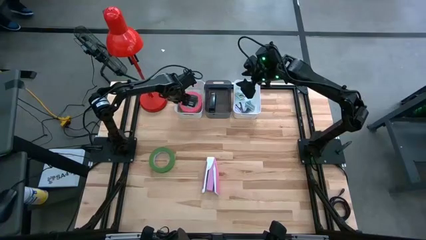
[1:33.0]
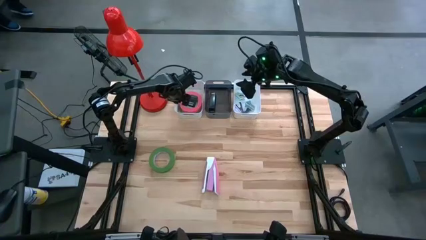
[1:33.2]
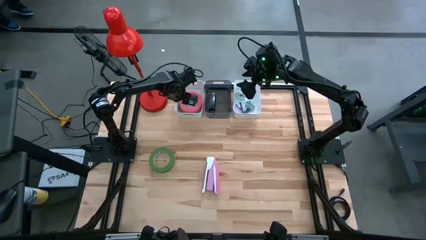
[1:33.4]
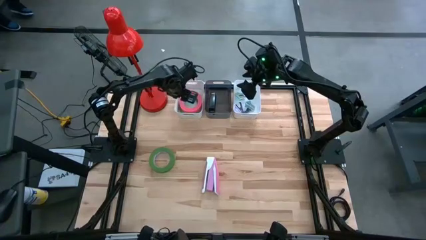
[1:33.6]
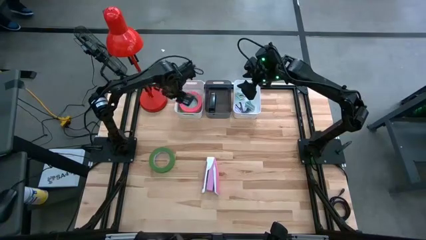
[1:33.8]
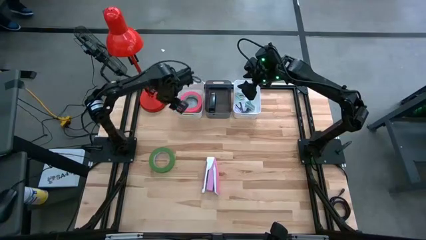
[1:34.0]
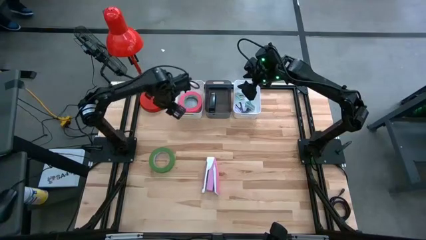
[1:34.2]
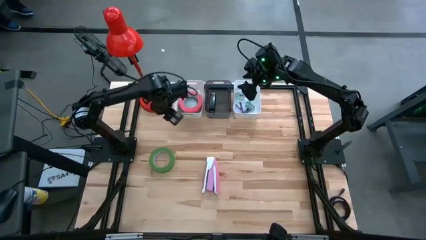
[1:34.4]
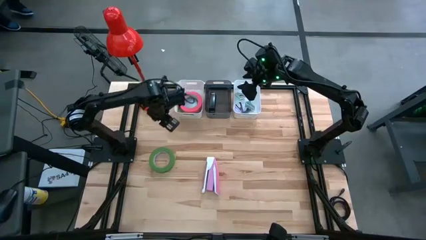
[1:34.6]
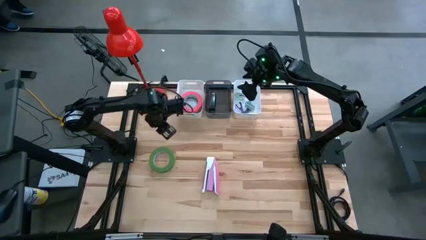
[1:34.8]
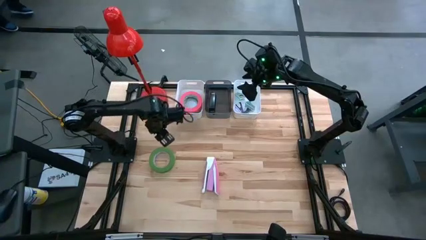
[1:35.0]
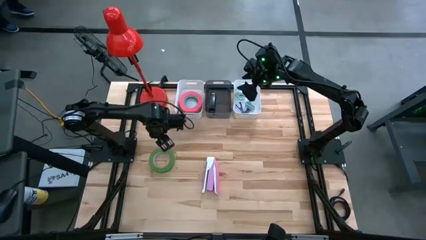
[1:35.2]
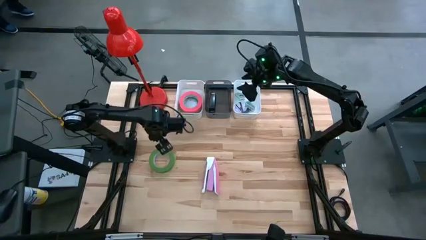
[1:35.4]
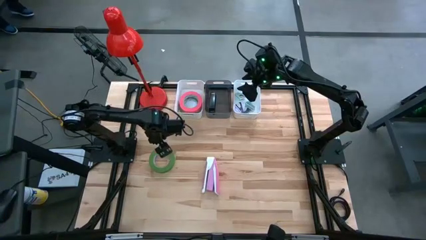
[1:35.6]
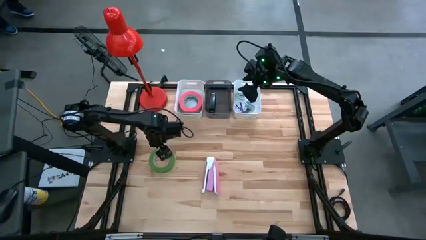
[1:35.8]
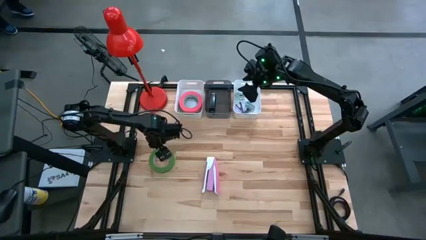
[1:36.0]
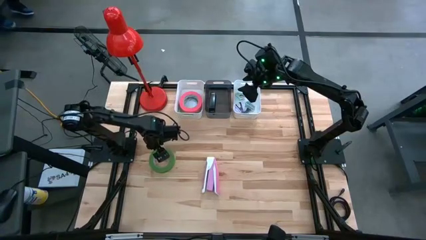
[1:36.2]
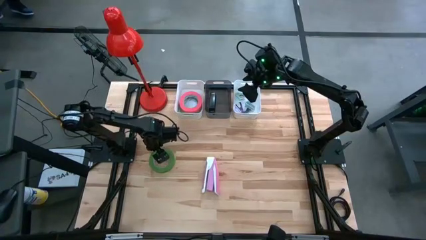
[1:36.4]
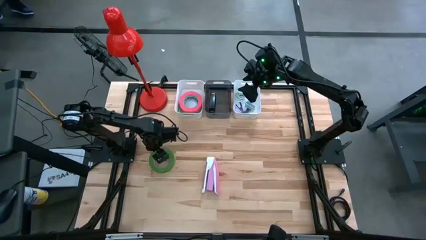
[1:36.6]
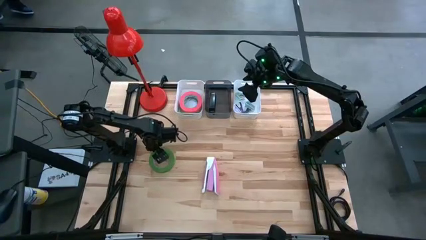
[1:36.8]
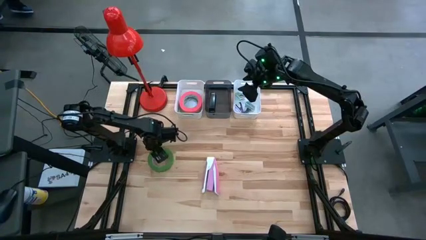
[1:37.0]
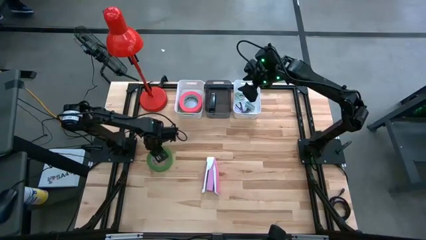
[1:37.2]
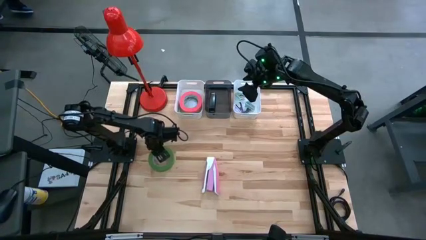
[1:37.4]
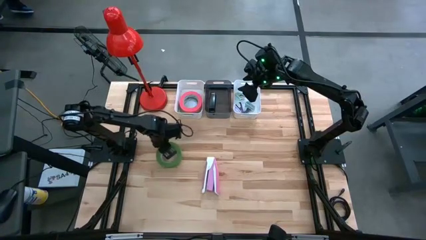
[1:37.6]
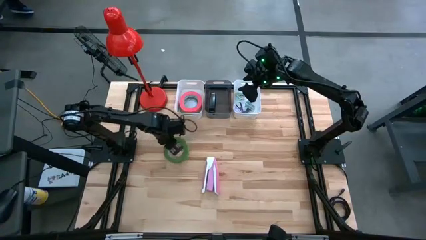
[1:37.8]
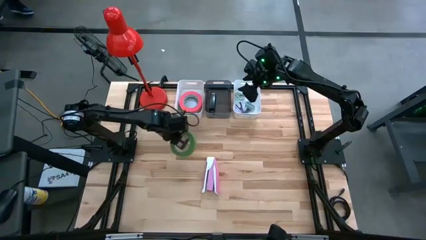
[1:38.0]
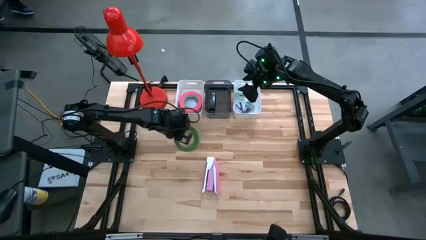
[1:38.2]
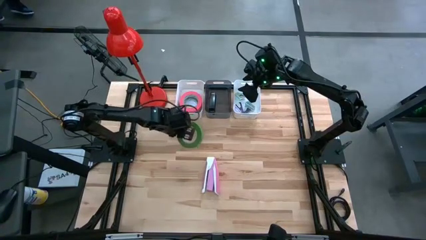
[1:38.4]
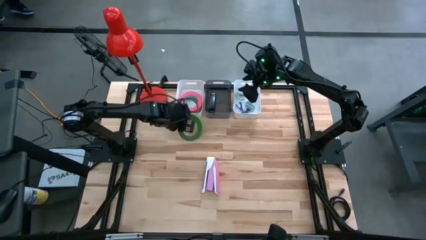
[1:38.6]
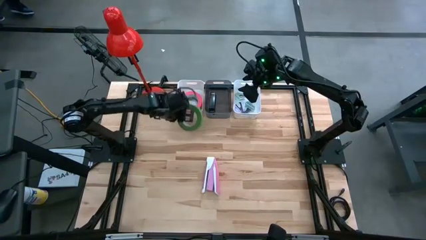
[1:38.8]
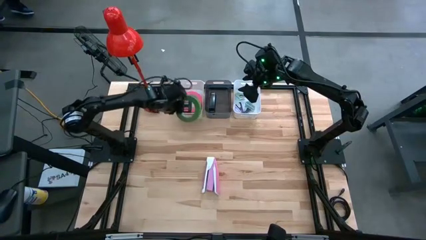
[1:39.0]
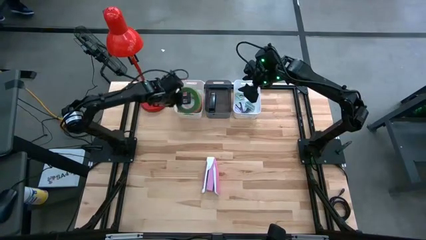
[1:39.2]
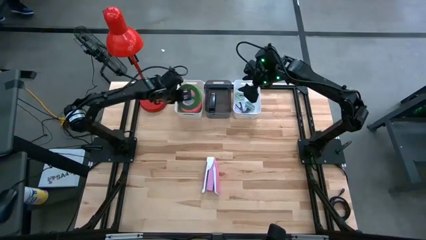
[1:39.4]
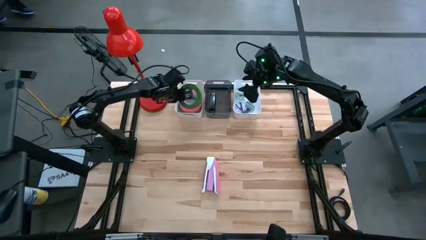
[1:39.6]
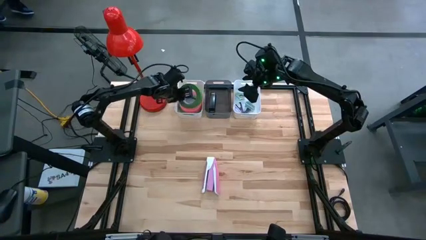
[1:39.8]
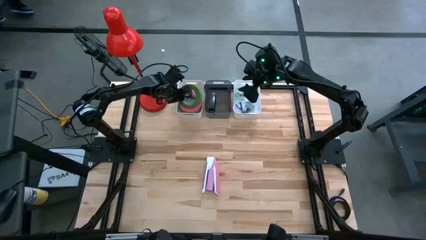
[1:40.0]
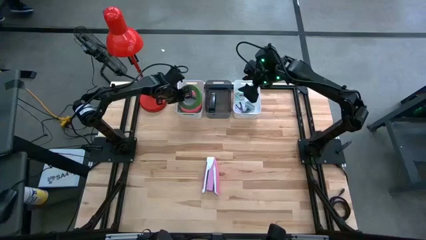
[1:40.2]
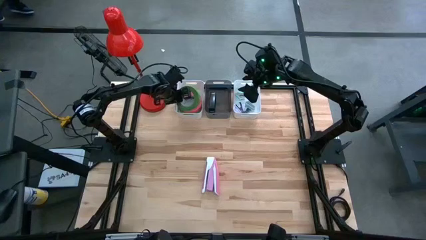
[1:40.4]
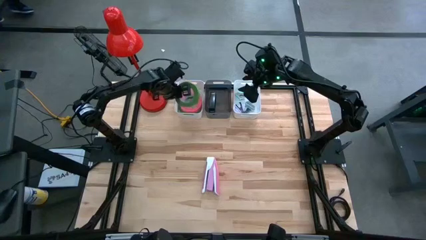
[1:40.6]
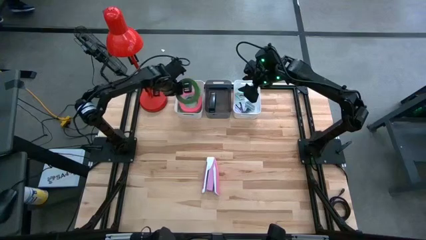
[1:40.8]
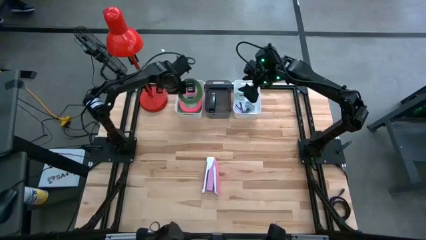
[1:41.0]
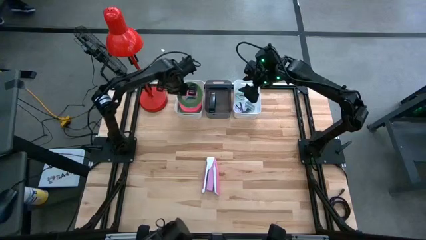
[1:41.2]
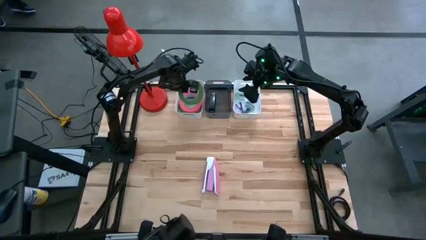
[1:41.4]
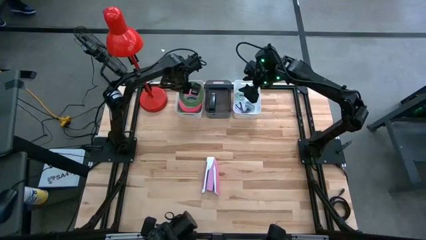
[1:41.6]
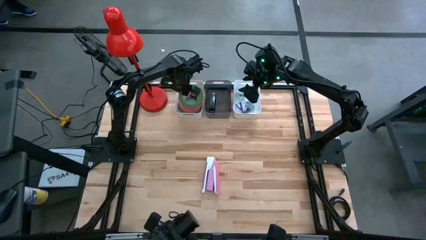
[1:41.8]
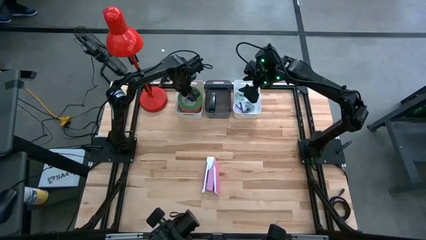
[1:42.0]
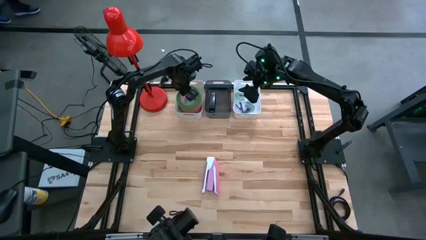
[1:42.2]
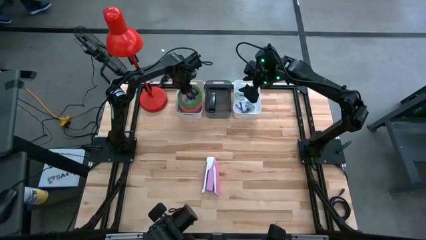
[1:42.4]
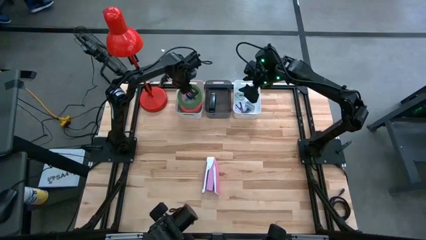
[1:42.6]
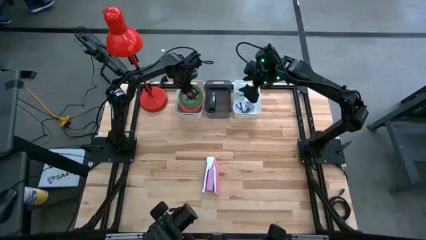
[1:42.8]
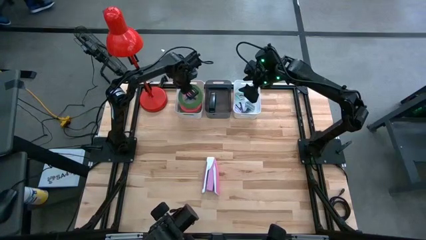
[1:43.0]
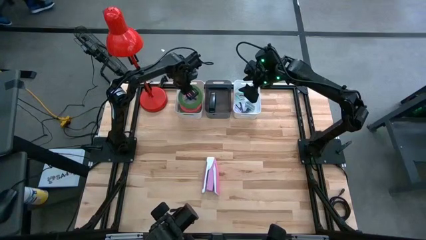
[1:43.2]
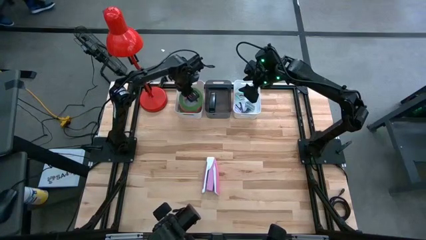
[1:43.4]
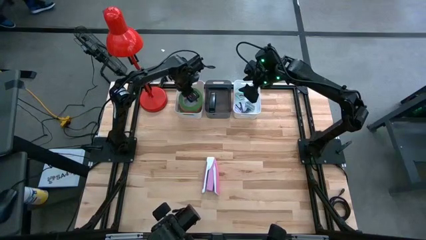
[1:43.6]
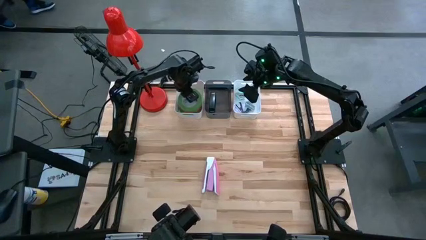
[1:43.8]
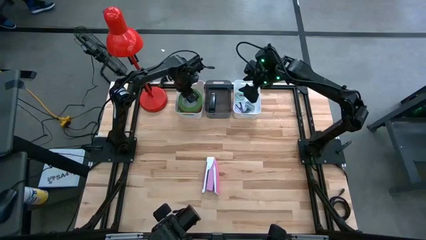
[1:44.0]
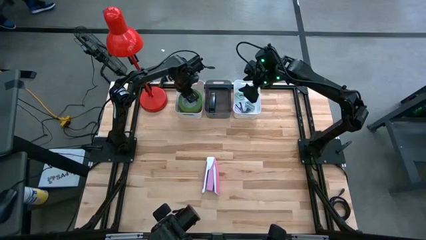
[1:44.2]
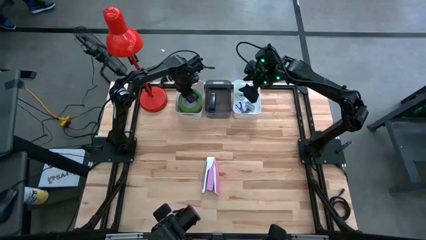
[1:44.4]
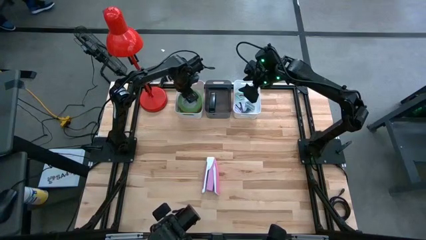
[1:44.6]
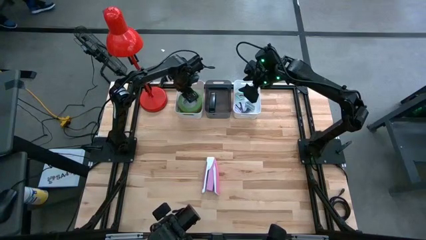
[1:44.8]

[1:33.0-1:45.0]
Task: Pick and place Stapler, Stapler remover, tape
Put the green tape into the left white bin
